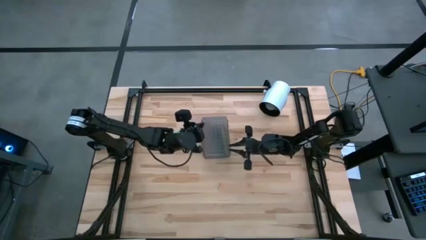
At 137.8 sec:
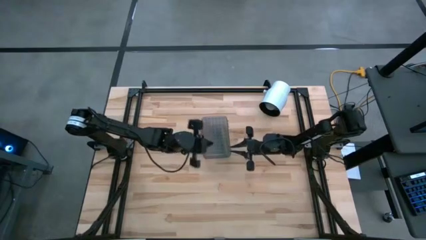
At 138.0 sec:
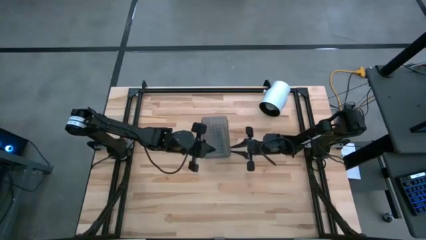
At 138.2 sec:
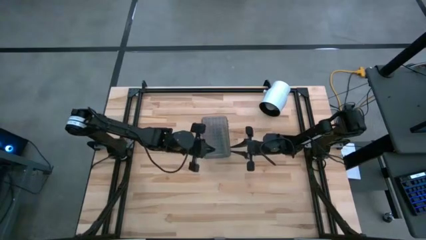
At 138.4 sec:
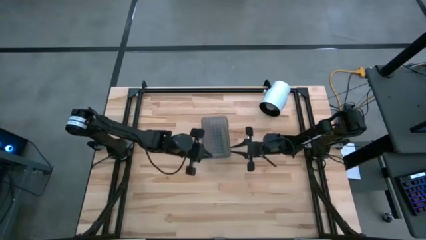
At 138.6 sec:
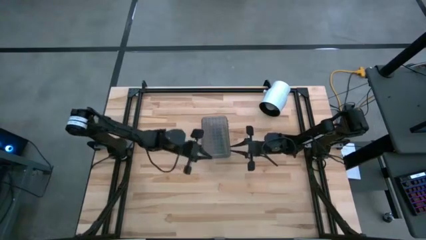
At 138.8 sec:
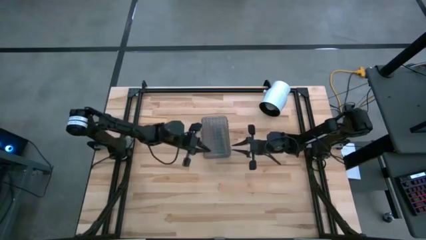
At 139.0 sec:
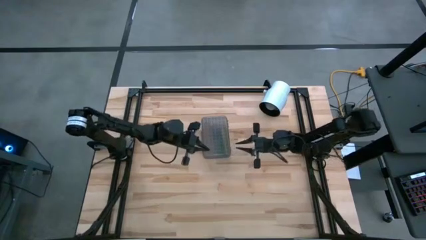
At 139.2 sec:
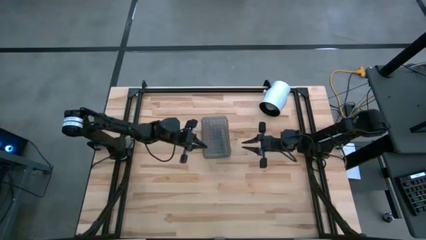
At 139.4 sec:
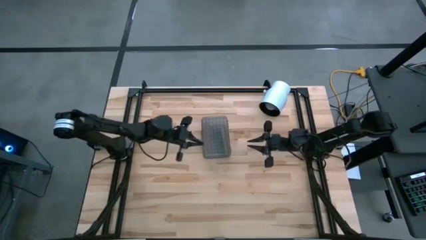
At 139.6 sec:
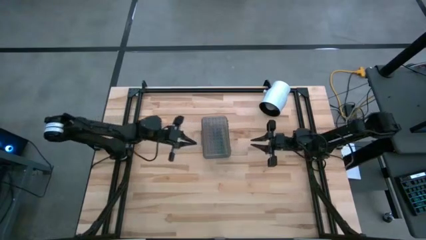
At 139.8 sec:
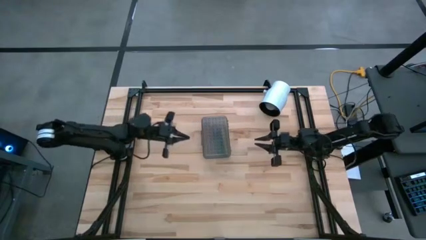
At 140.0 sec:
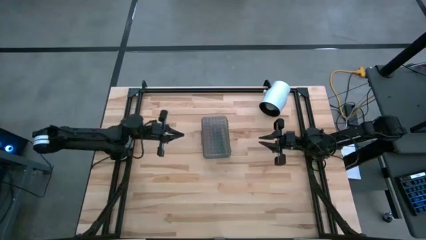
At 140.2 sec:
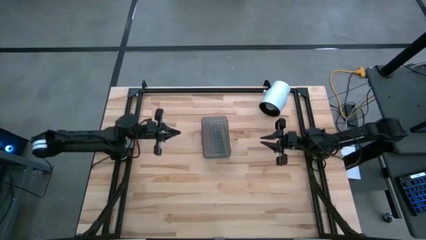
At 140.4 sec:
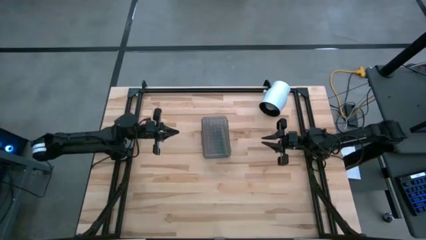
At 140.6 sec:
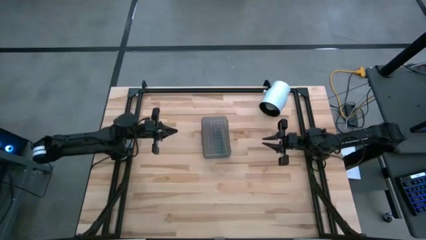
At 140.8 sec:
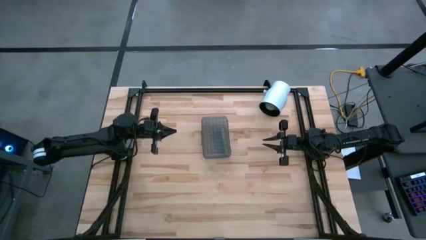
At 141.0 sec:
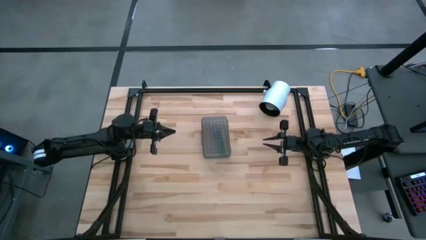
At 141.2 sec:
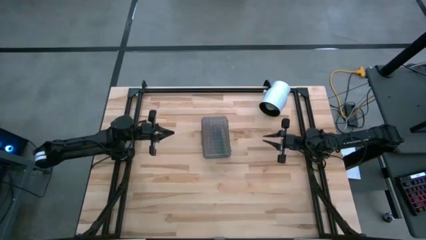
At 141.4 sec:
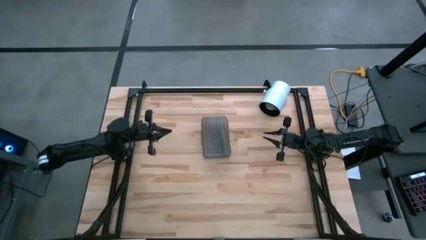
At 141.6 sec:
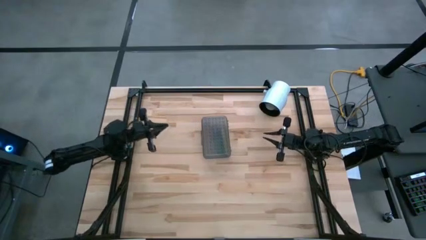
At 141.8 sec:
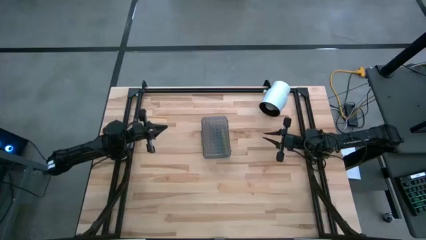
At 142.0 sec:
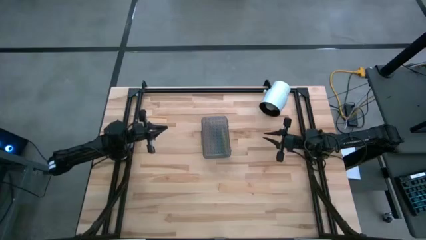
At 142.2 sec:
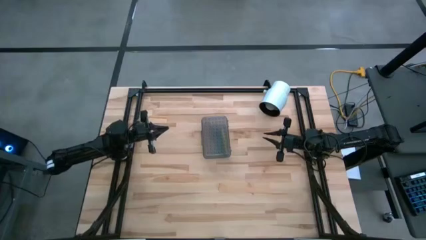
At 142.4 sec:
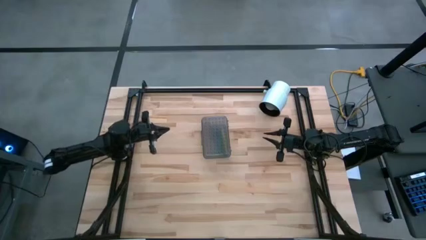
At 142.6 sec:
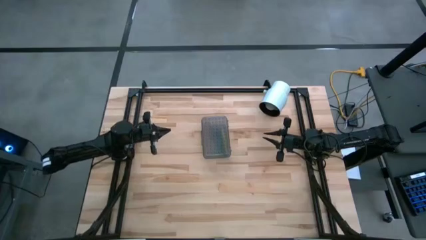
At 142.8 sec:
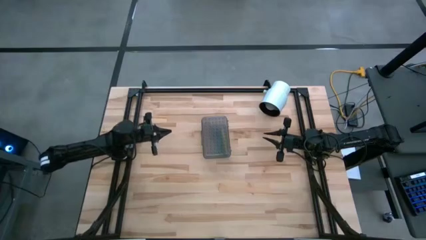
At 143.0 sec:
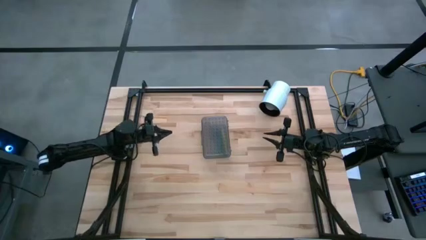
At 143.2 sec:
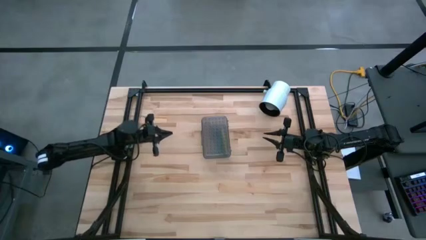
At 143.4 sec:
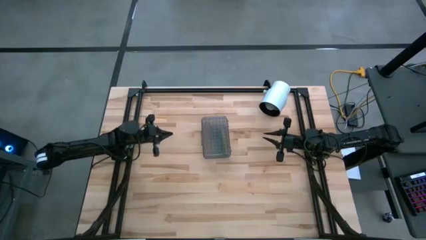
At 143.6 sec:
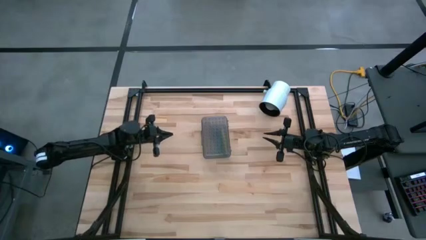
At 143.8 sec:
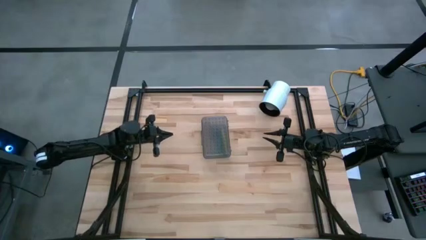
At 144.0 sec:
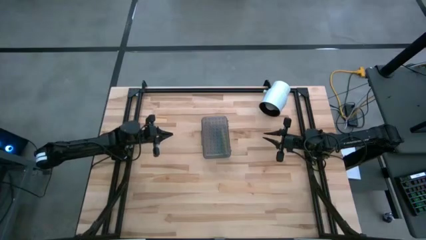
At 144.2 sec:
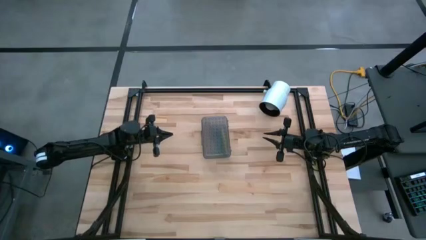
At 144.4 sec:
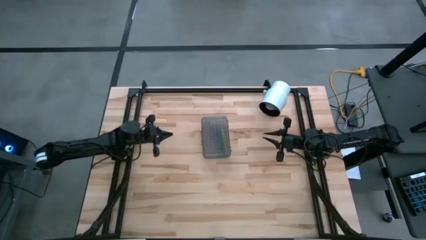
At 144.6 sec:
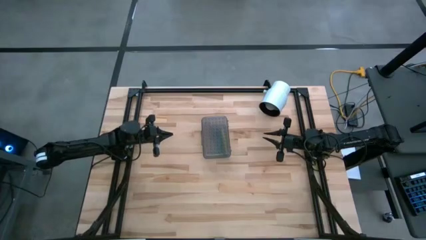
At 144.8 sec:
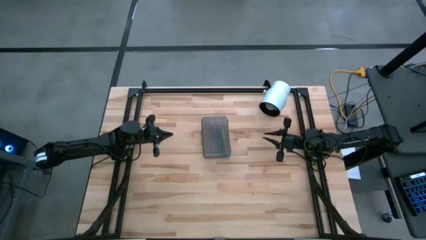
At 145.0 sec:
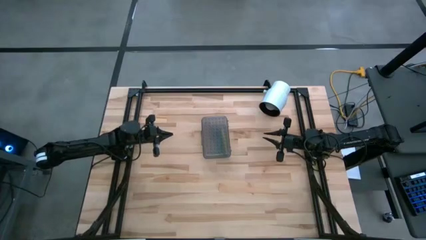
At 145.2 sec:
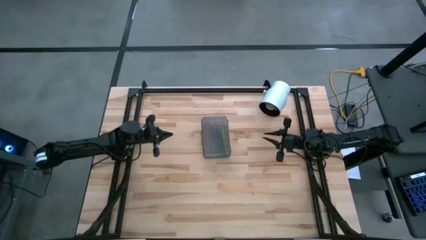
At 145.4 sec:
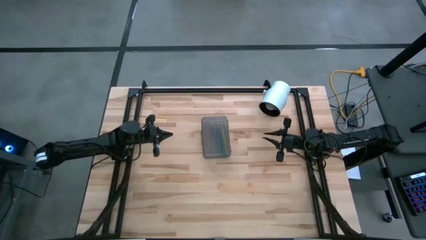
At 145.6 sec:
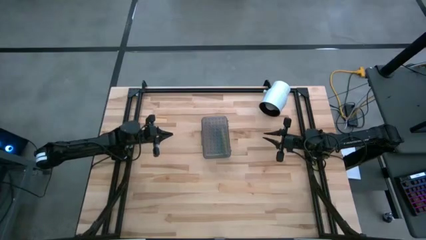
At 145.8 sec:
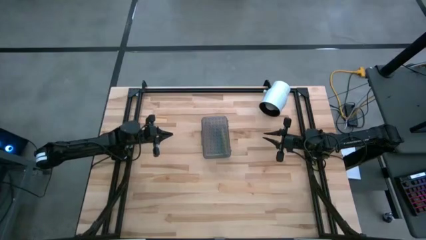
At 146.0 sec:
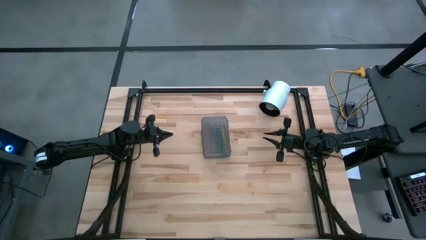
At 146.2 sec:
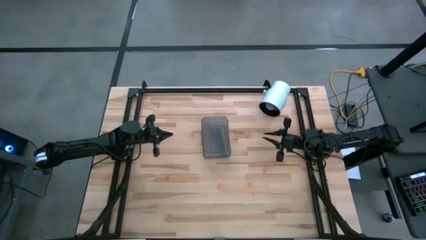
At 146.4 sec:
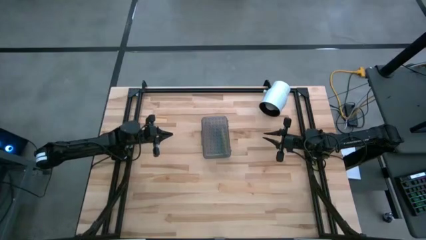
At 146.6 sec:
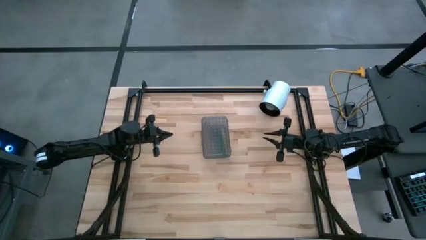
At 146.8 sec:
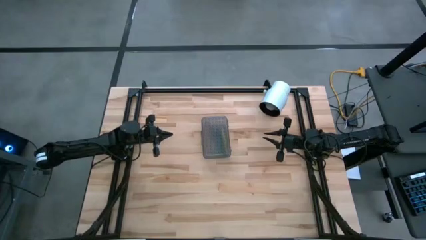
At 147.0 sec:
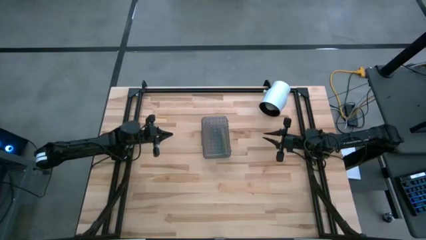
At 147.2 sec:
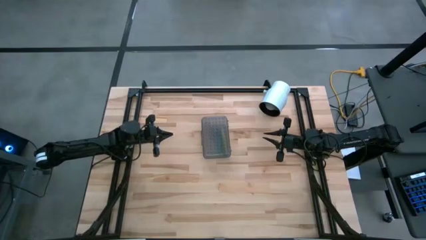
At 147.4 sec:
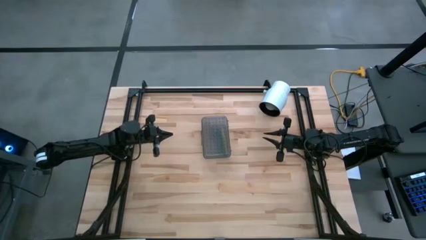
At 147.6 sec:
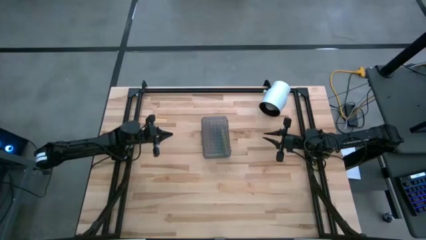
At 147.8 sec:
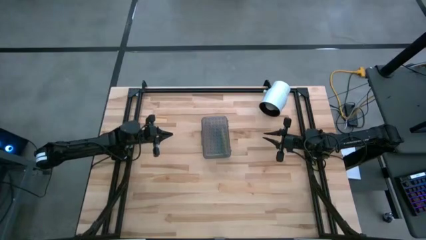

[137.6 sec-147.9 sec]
Task: Pick & place school supplies into a supply box
Return to Home Position

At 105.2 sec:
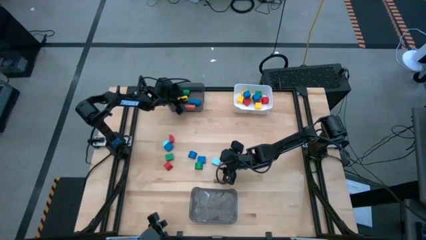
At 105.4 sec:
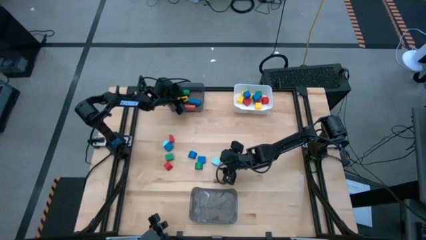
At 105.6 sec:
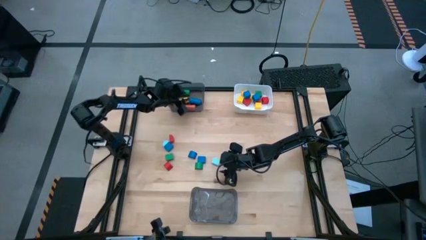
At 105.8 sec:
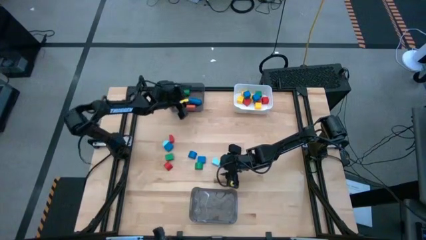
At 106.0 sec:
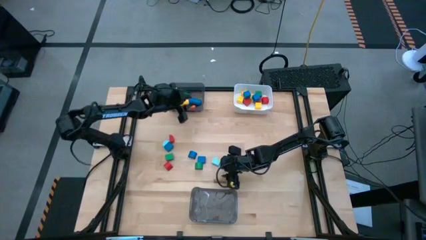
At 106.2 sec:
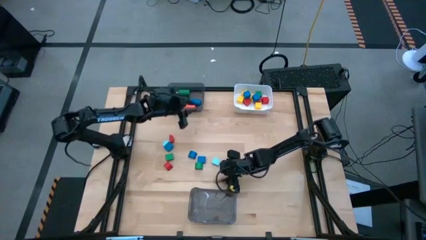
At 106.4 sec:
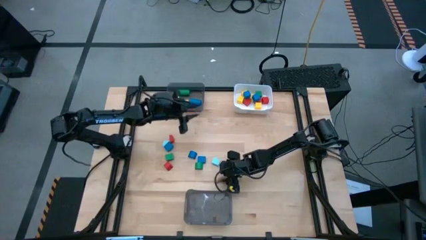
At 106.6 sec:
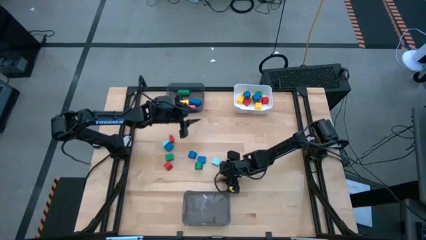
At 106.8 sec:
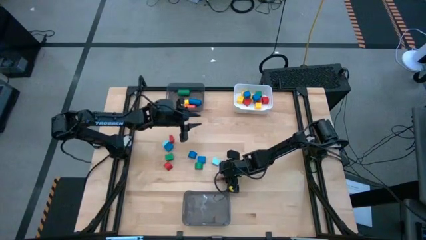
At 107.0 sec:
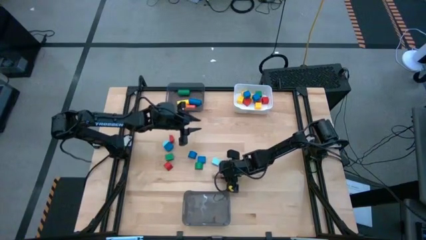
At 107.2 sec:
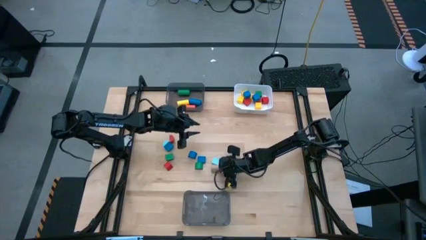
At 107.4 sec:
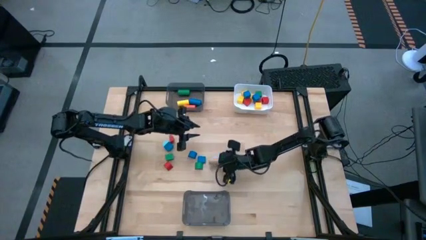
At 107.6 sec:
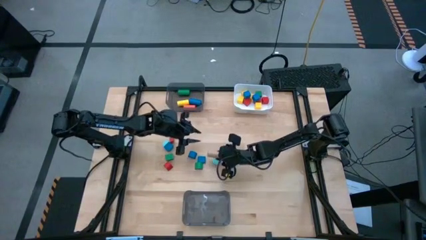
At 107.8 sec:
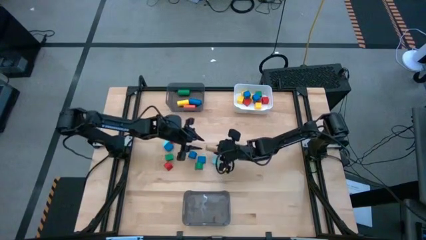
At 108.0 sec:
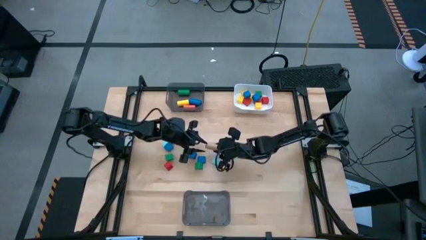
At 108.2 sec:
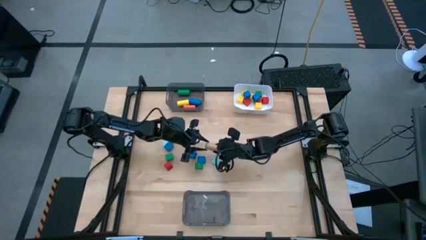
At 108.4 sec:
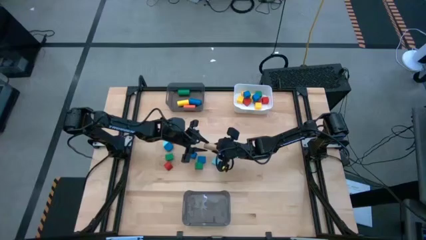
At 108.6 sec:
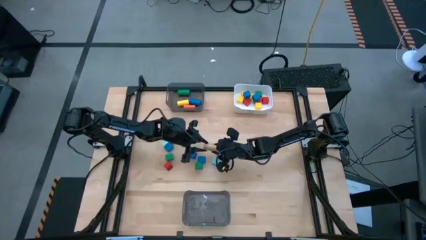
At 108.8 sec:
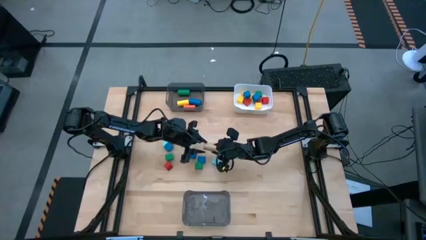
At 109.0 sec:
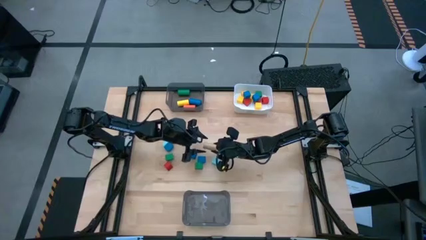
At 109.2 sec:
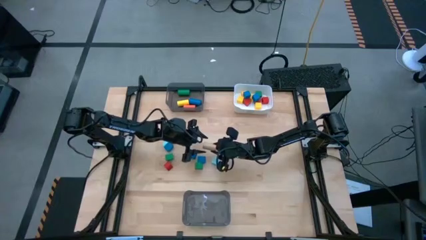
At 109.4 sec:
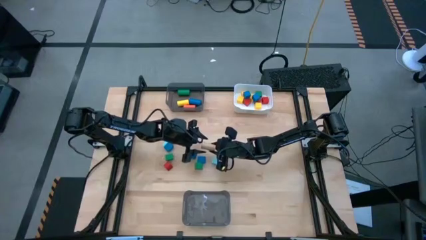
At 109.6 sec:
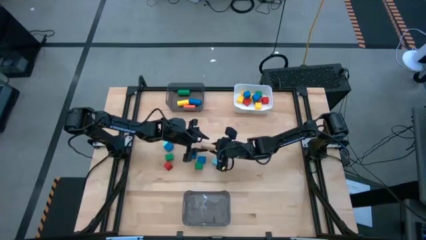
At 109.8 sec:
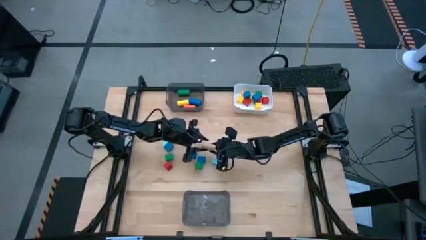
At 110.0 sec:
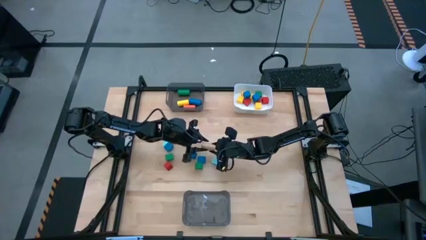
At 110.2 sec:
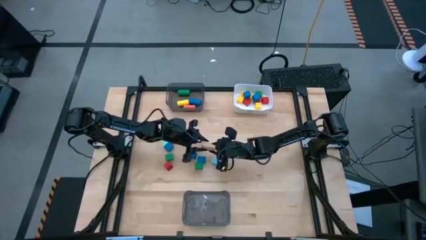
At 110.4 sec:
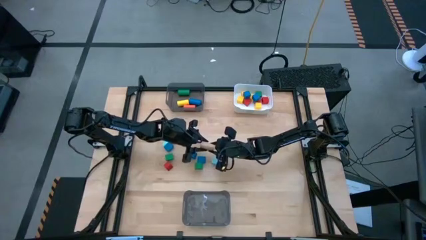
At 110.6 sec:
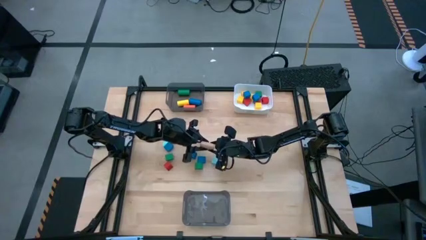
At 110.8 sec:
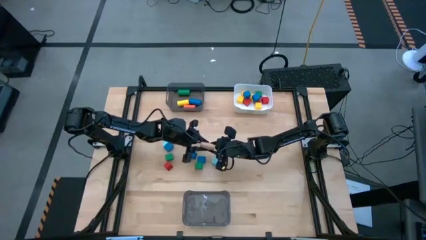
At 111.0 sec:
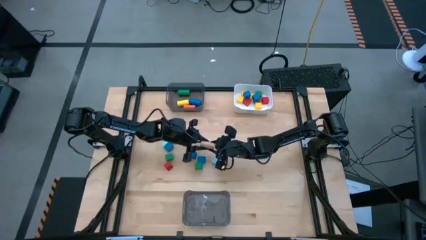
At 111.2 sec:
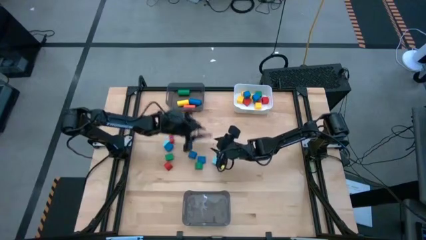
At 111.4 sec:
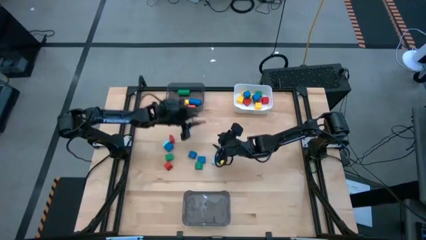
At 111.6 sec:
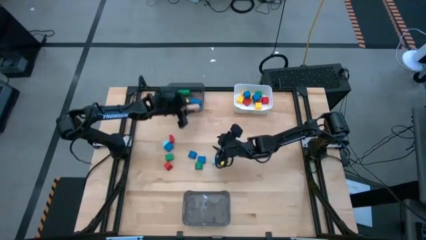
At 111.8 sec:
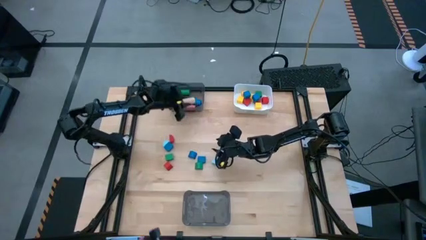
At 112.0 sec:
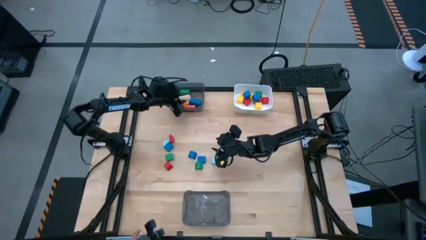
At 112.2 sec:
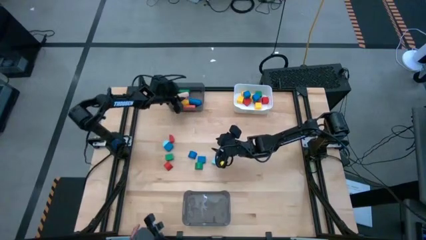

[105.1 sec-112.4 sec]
Task: Sort blocks by size
Put the light brown cylinder block into the top black bin
